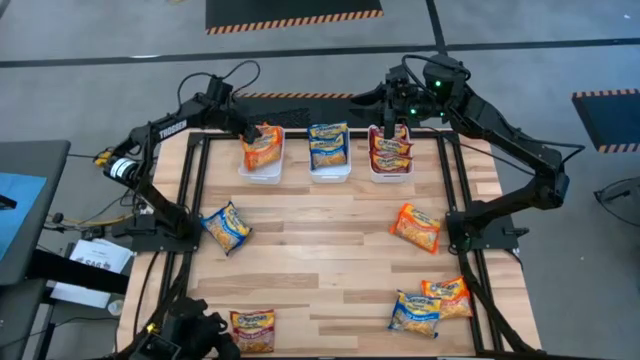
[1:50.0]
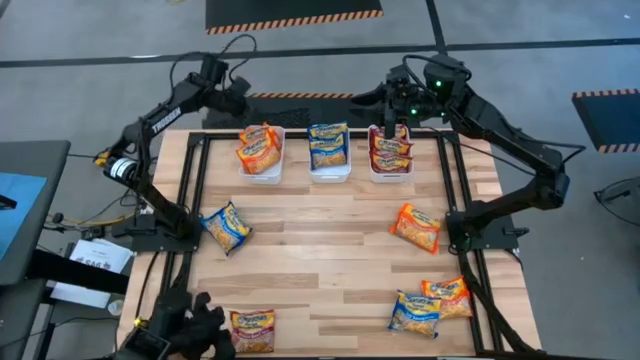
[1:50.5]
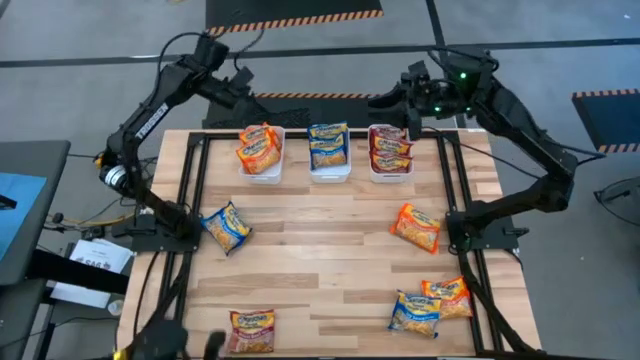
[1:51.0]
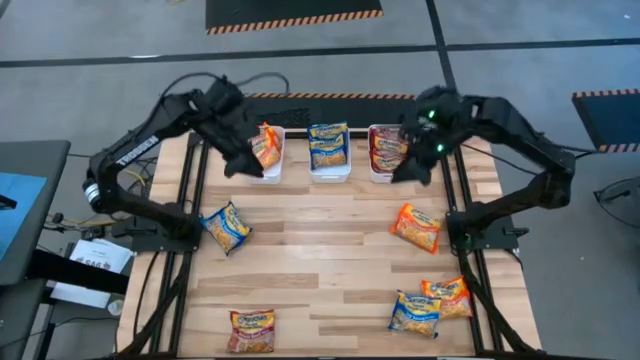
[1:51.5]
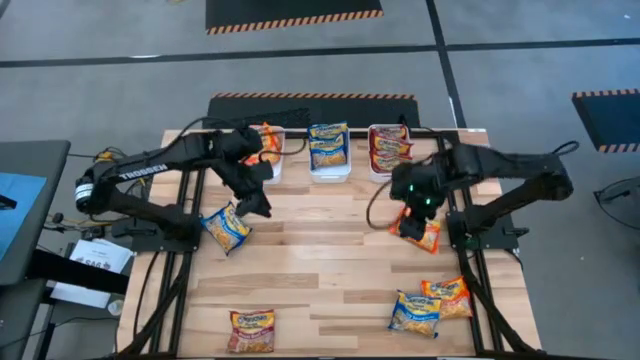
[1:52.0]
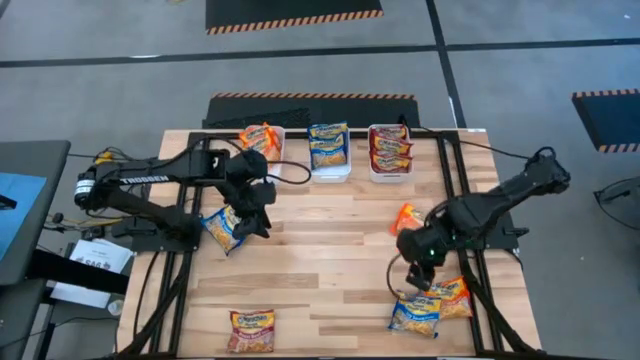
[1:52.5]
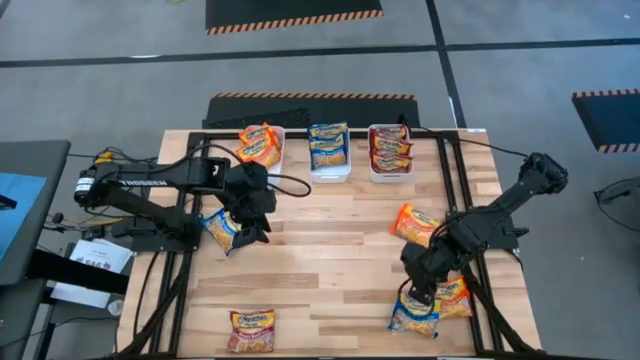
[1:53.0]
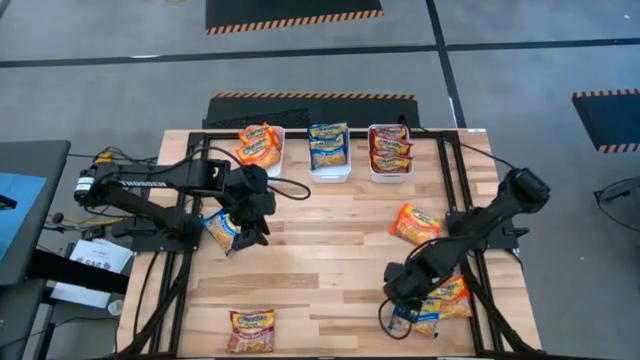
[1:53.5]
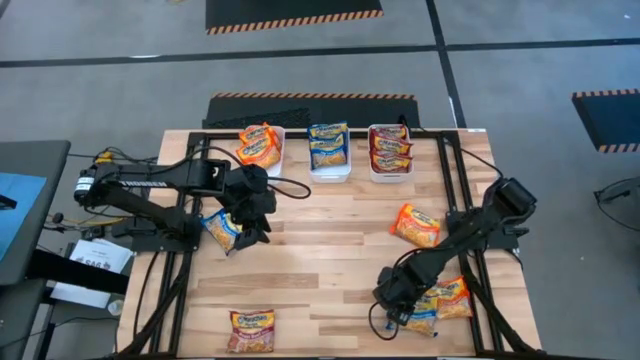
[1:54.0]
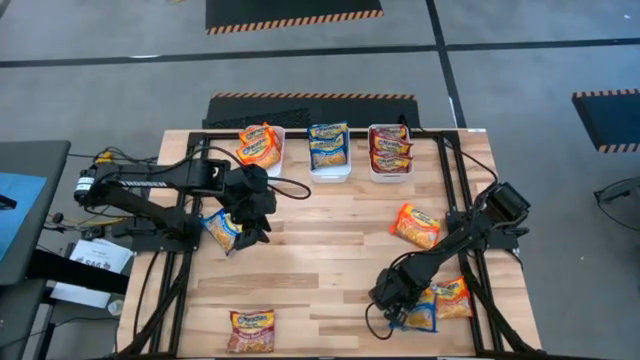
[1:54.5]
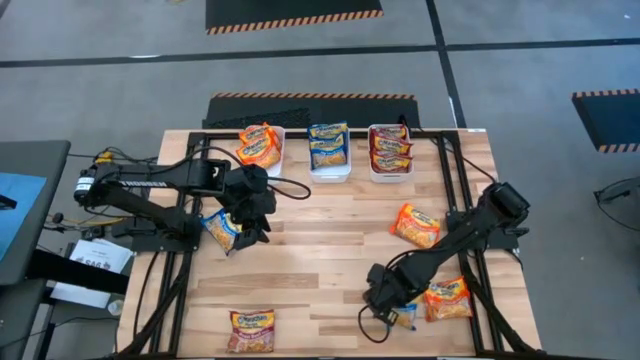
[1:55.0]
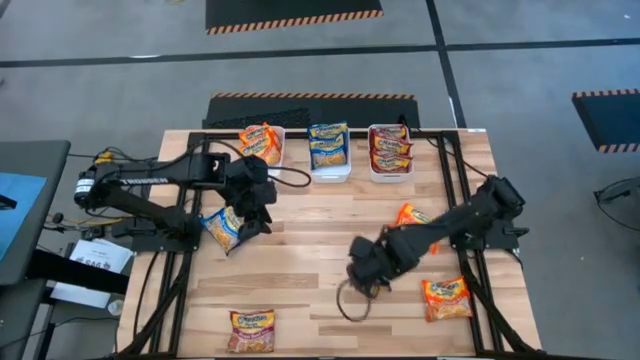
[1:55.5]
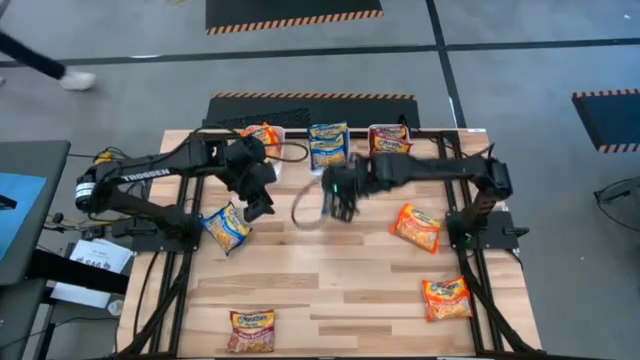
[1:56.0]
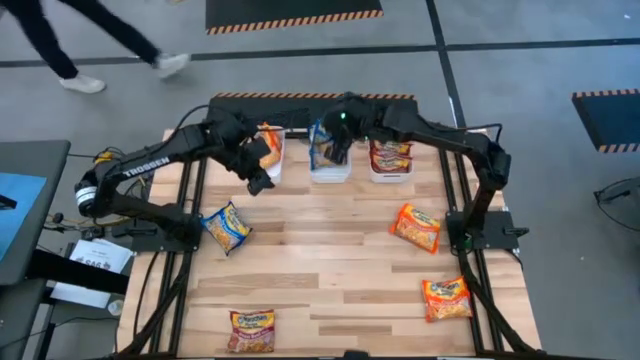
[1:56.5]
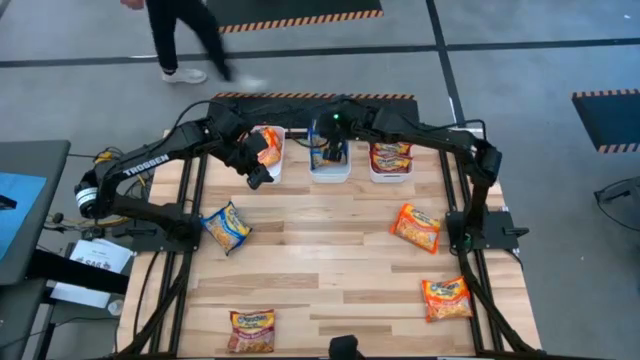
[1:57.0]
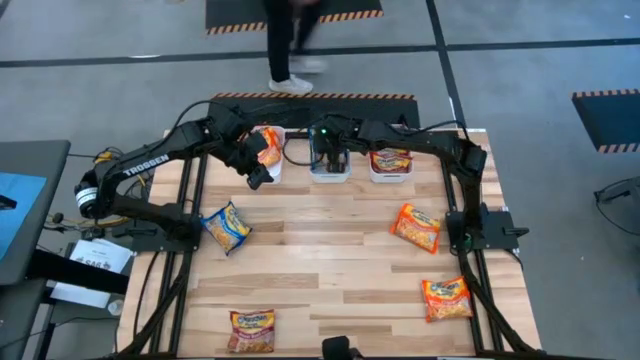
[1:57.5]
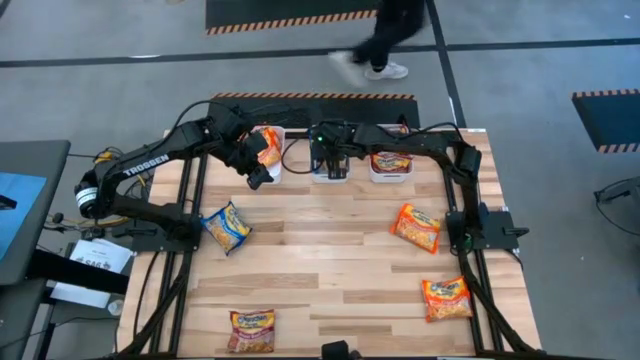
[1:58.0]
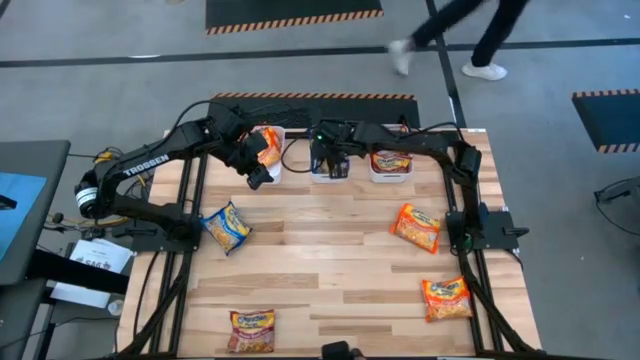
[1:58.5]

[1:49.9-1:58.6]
Task: Sort Maruchan noodles
Put the blue noodle pack into the middle white bin

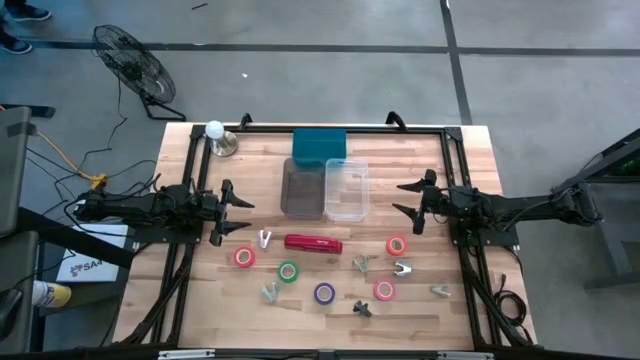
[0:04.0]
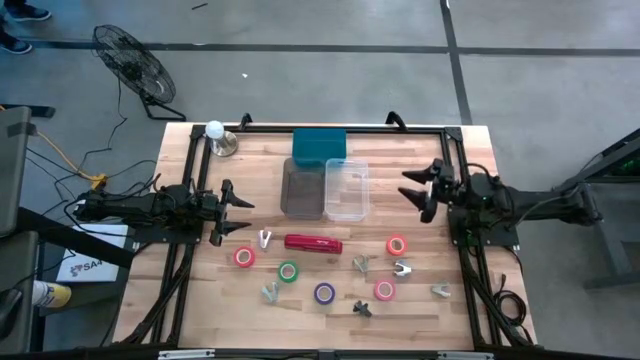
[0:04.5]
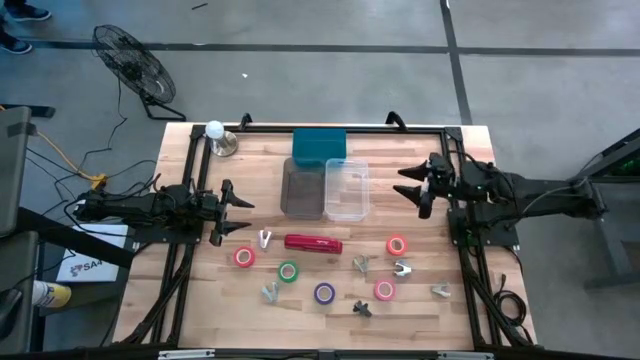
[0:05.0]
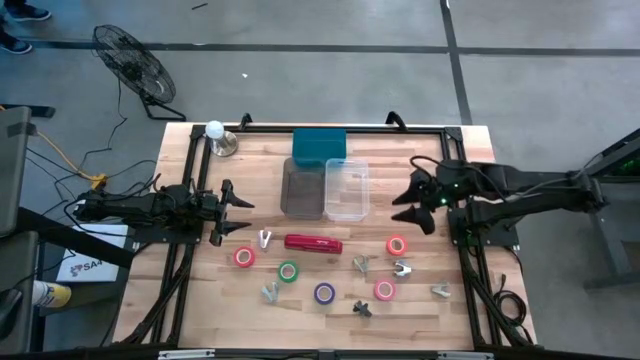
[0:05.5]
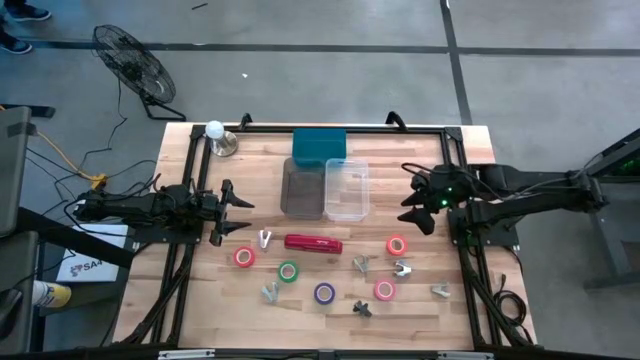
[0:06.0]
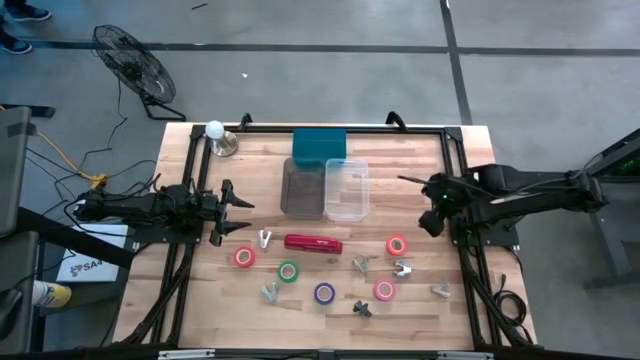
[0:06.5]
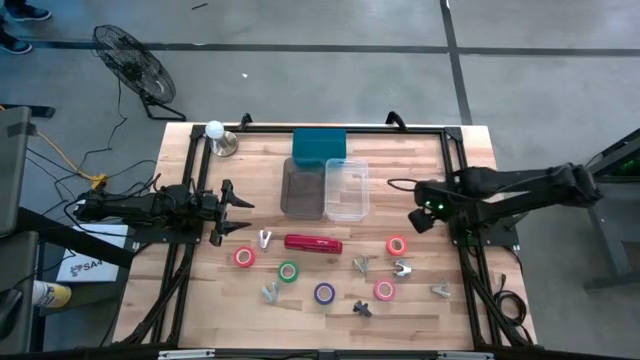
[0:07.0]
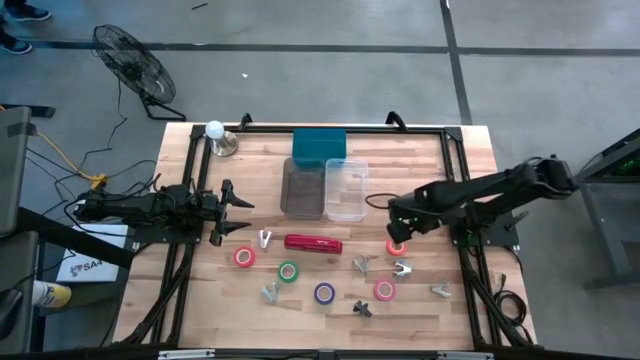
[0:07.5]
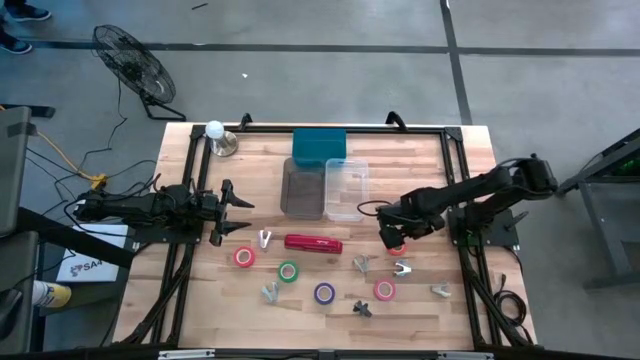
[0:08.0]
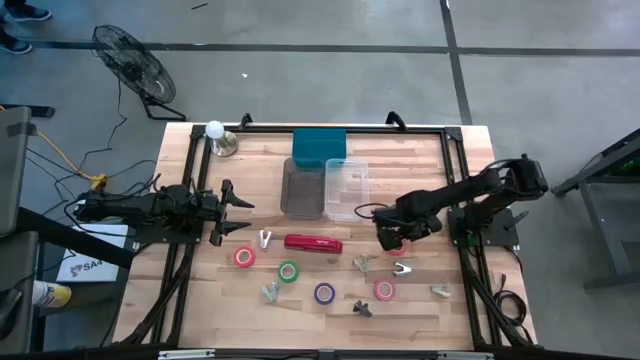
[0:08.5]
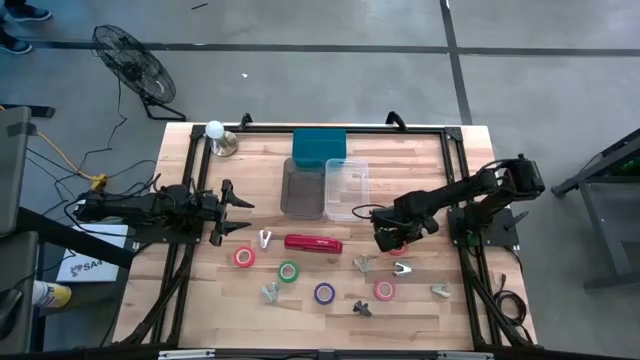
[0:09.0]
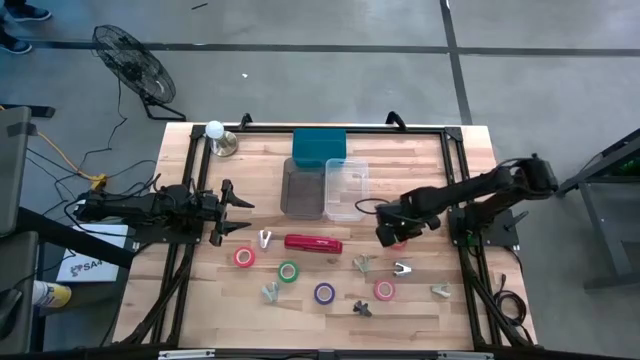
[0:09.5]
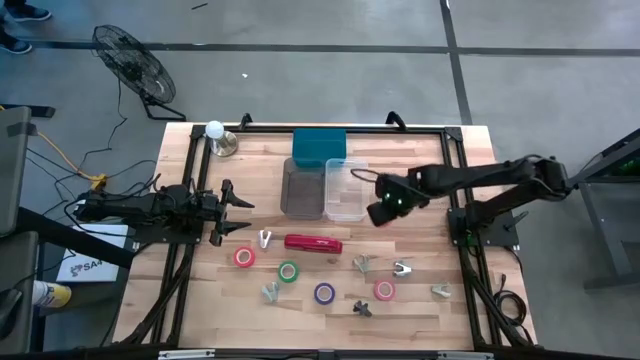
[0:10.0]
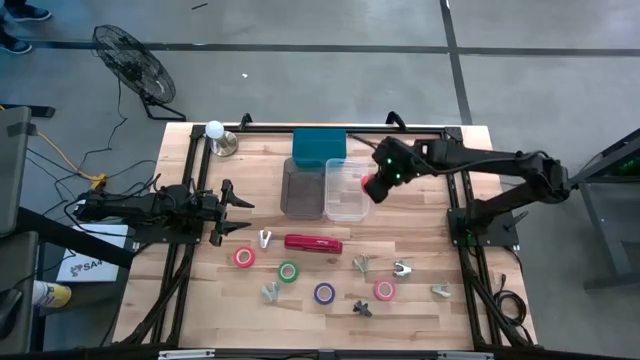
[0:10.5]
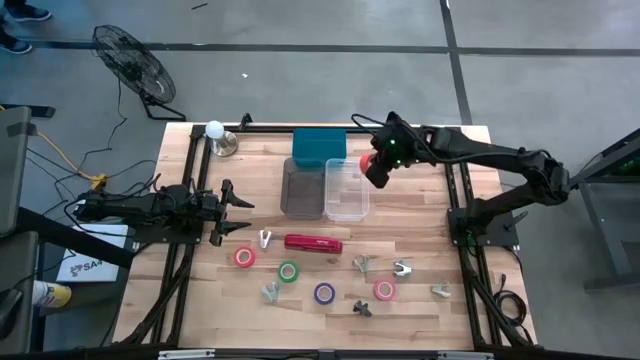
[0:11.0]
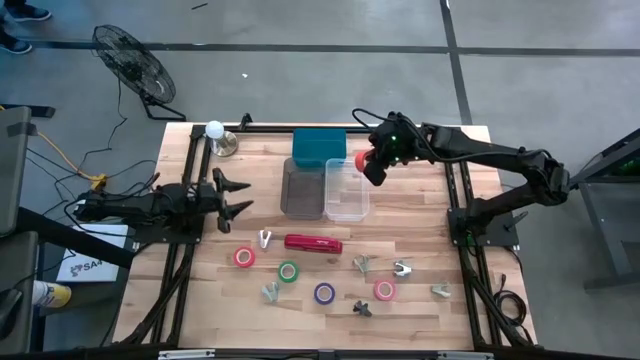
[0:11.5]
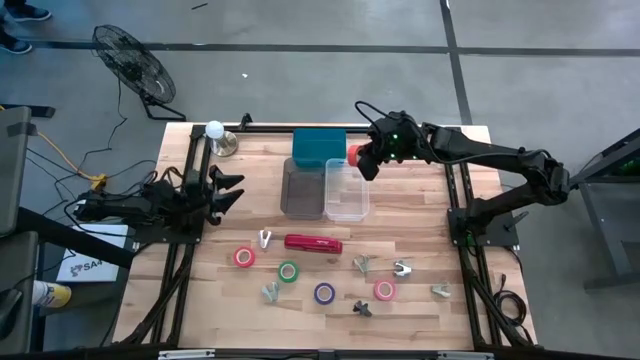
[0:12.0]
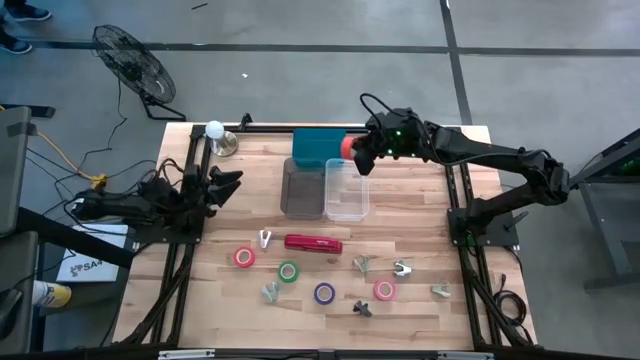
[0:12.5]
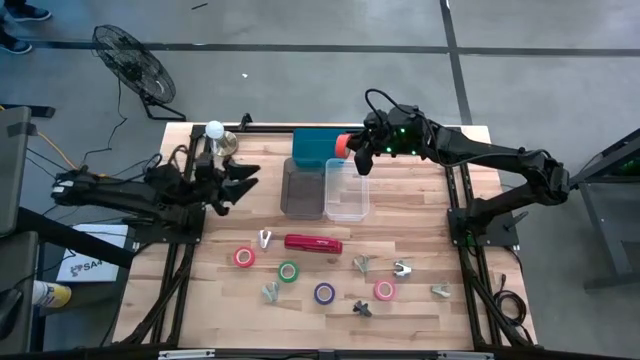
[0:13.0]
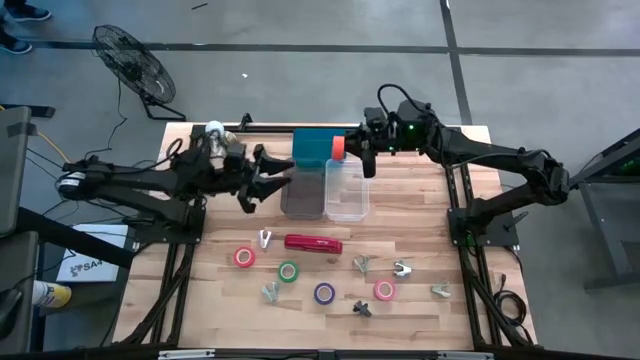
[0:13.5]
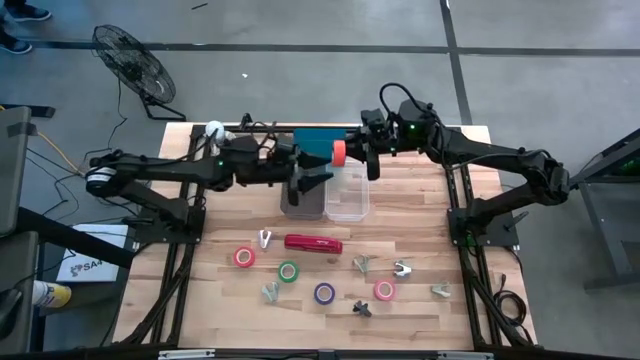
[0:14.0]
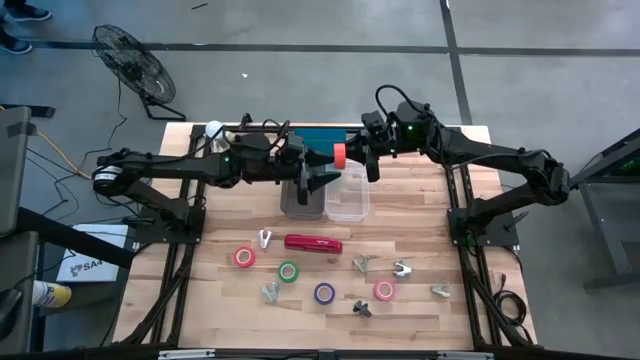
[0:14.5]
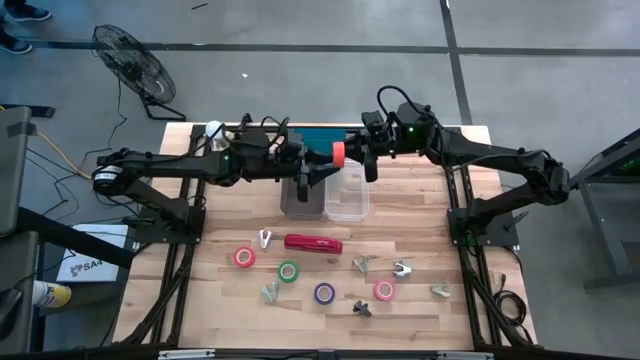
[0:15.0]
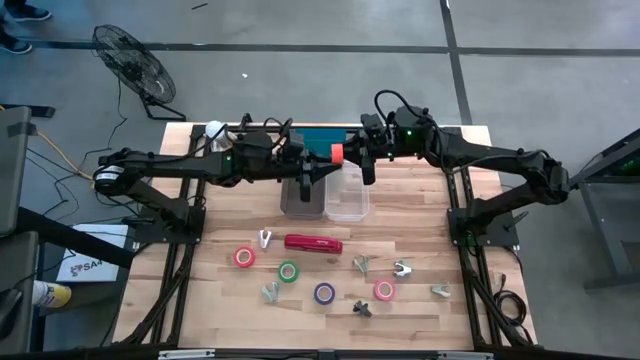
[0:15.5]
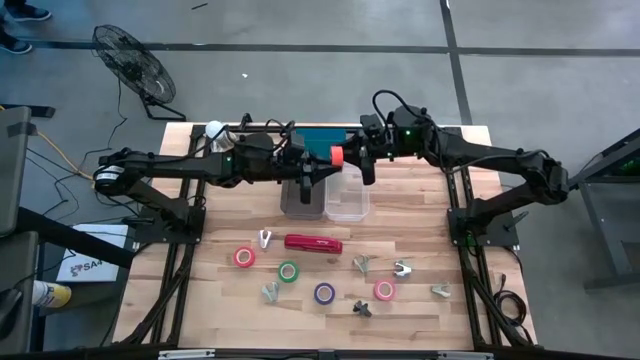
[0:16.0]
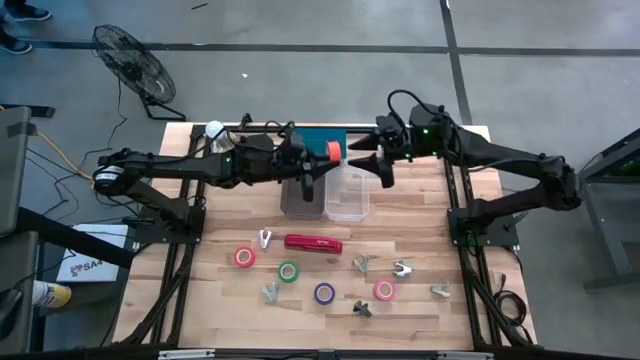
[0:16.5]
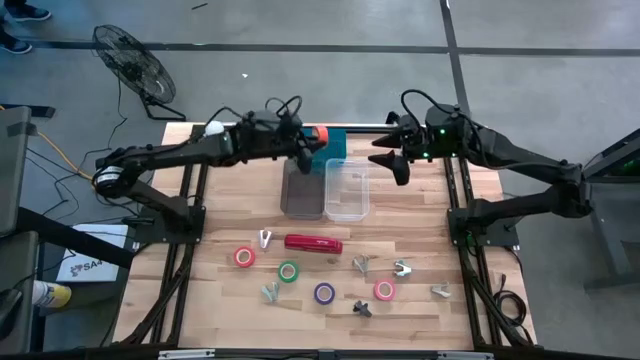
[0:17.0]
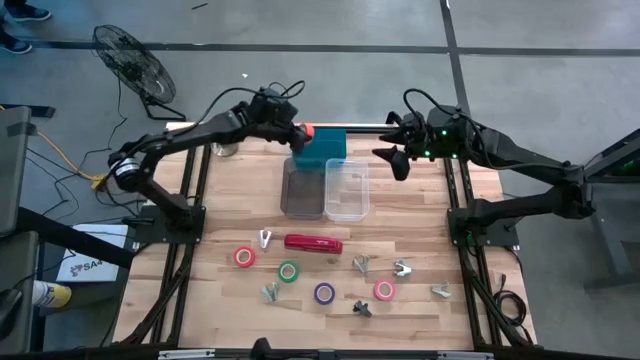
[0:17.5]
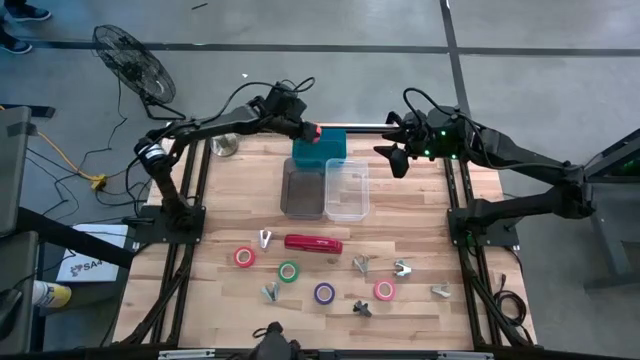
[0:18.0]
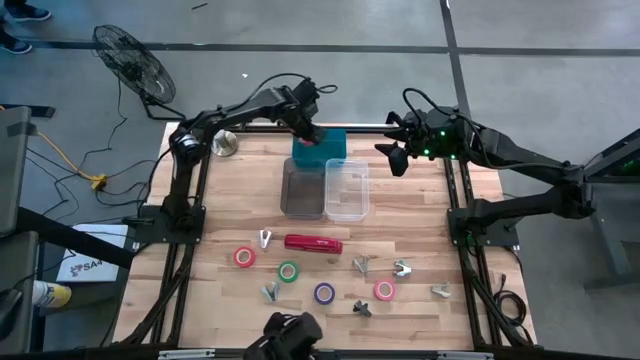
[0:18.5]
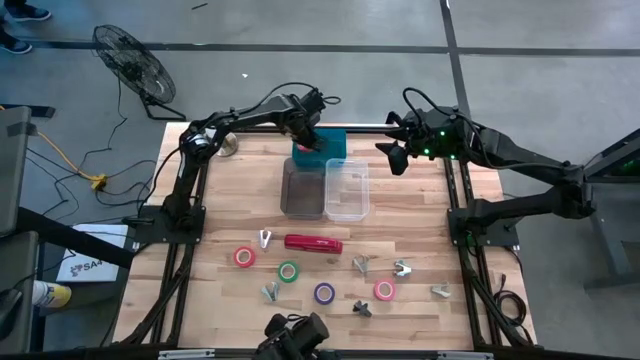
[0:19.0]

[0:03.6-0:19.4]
Task: Pick and place Stapler, Stapler remover, tape
Put the orange tape into the blue bin
